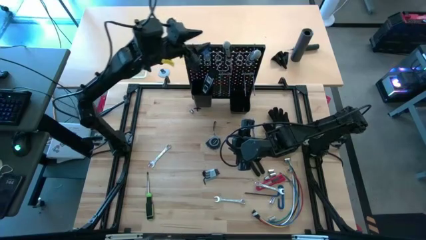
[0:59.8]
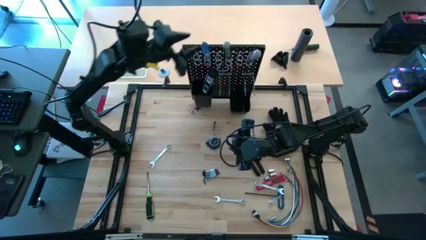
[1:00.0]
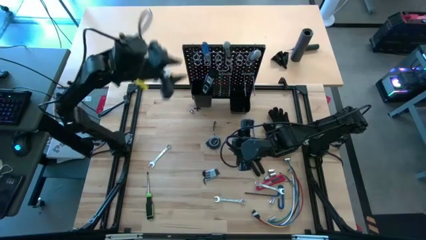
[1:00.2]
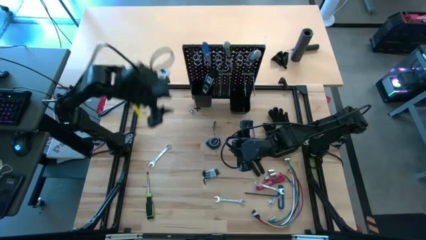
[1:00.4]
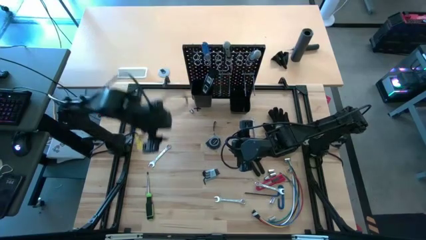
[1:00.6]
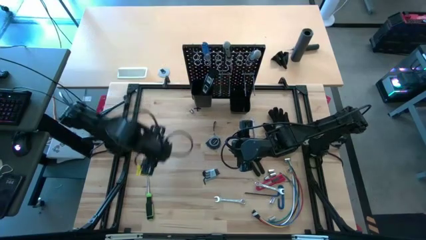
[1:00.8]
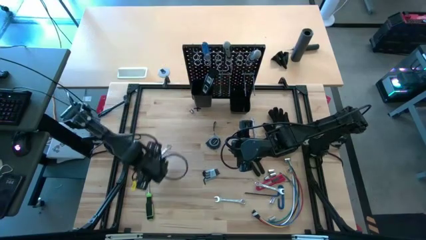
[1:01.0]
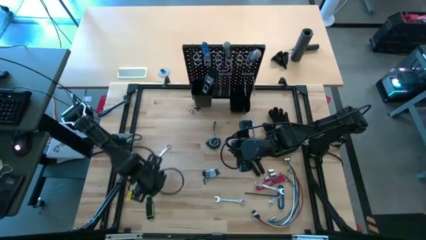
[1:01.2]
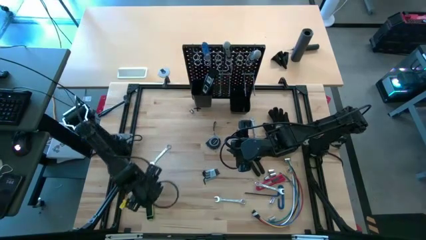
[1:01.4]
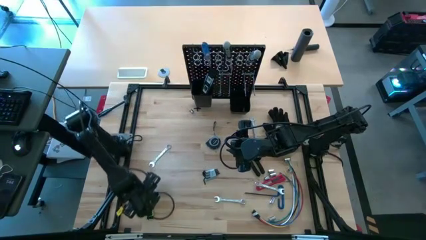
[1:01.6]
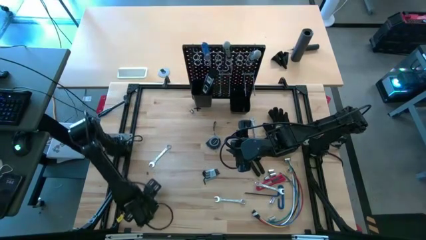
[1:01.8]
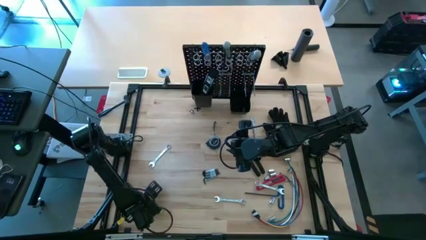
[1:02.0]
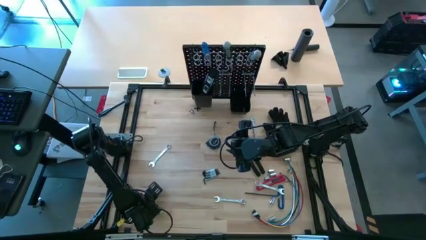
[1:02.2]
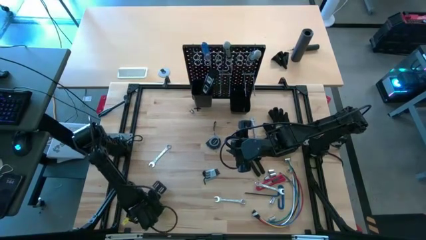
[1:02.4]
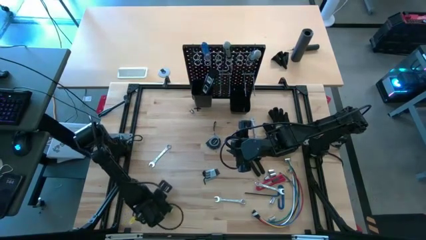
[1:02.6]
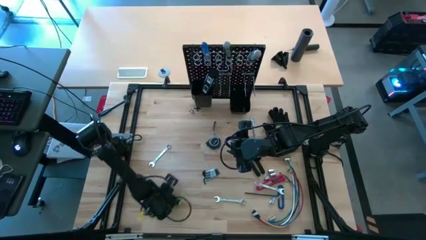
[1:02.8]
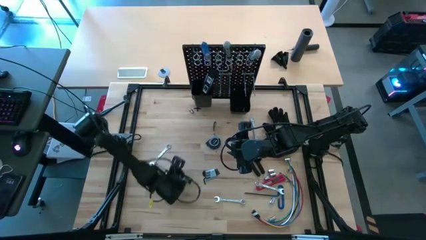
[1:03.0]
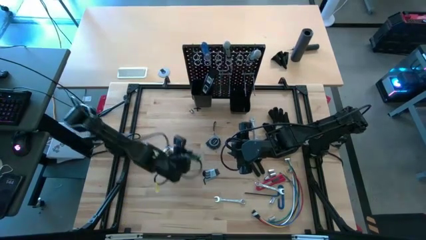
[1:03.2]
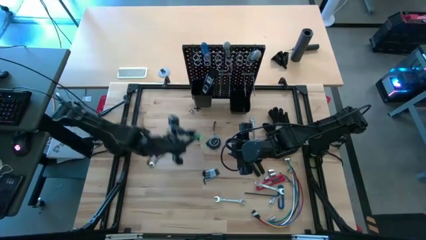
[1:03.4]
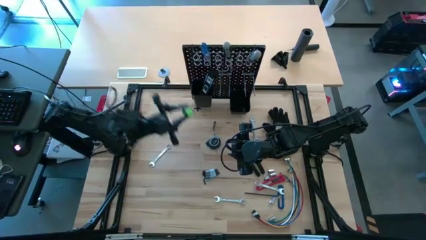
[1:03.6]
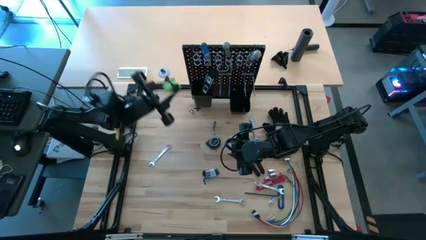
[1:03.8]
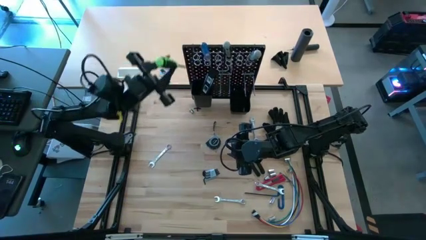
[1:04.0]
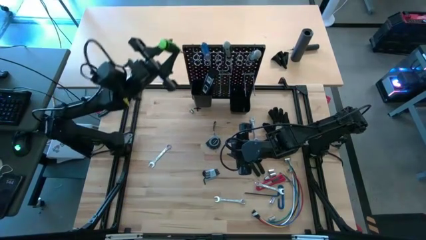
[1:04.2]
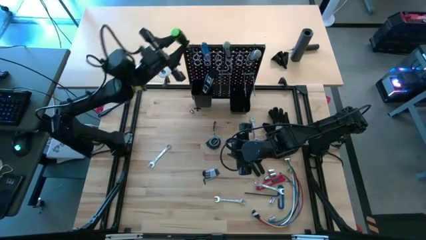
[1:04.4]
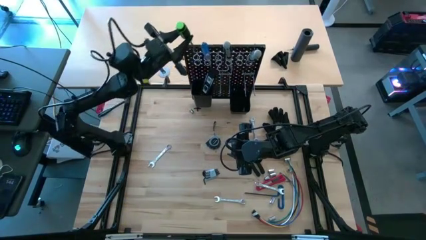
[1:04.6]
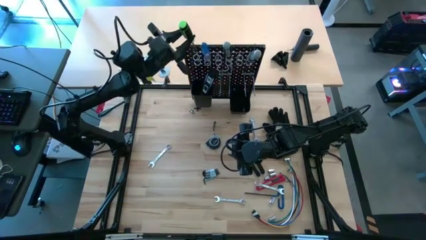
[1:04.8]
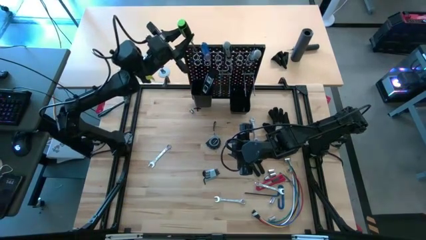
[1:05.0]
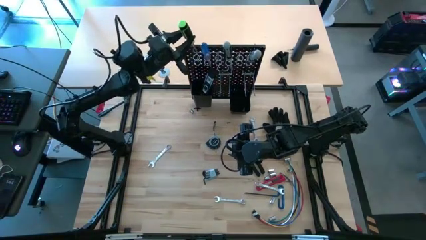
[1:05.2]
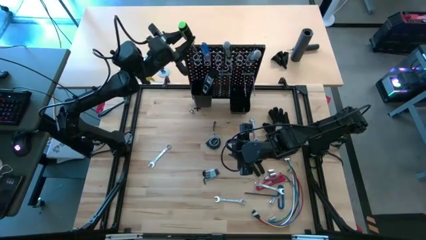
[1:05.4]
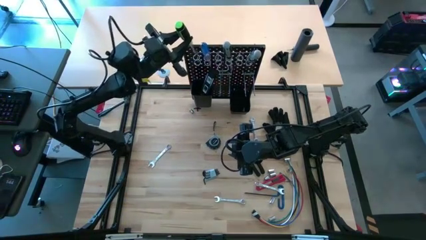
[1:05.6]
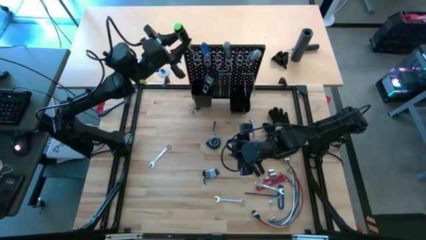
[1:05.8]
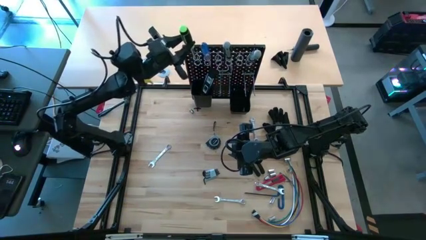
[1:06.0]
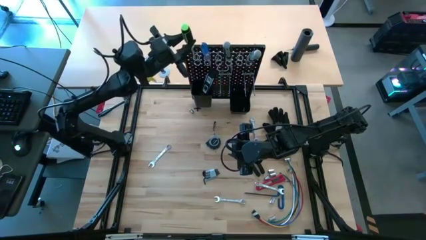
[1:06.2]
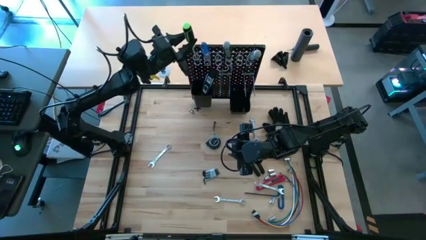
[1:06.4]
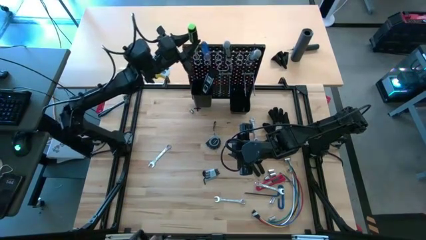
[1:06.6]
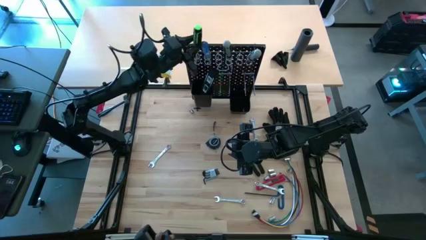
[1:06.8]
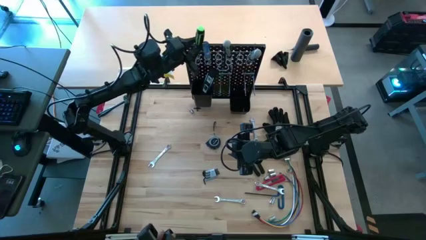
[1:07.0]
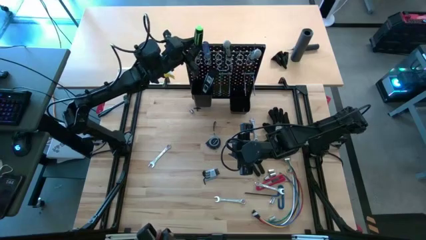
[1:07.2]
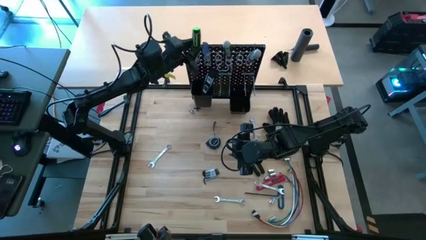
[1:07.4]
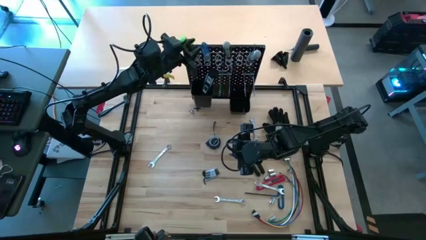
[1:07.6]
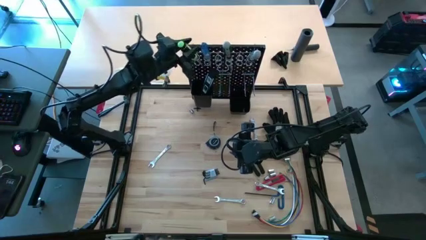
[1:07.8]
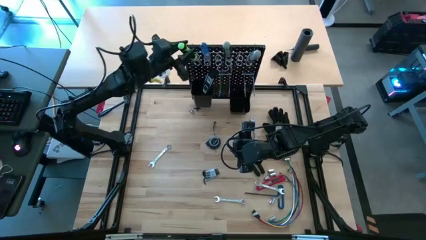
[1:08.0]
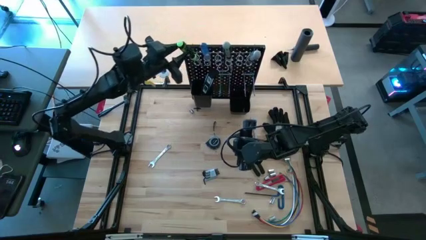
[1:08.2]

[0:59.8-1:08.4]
Task: Hang tools onto peg board
Hang the green screwdriver on the peg board

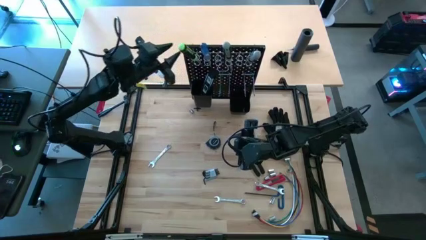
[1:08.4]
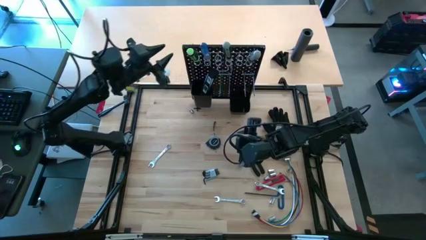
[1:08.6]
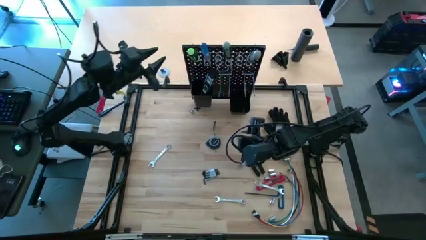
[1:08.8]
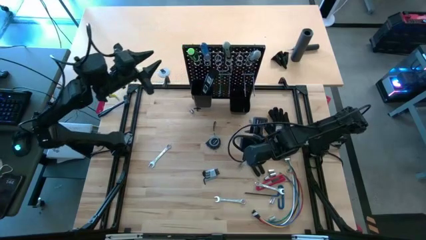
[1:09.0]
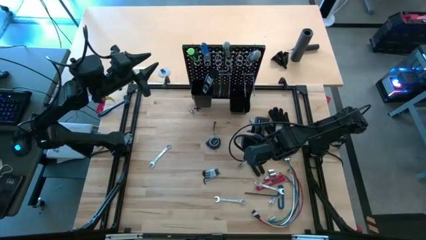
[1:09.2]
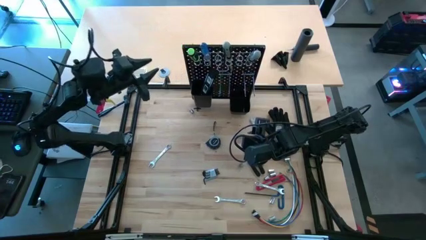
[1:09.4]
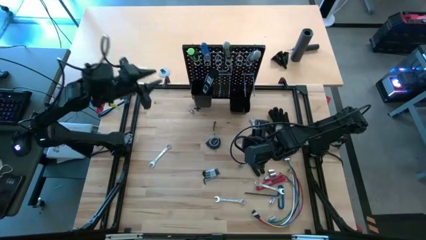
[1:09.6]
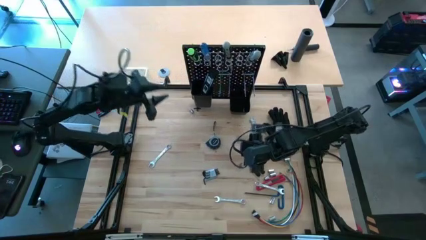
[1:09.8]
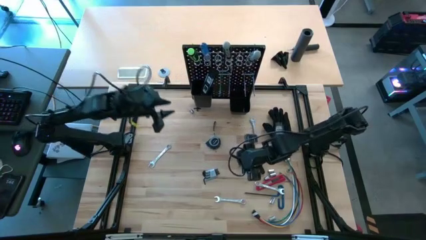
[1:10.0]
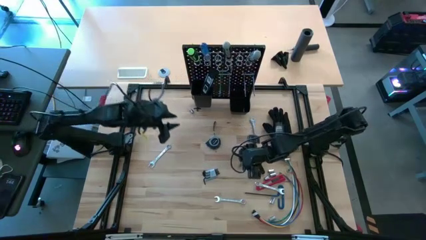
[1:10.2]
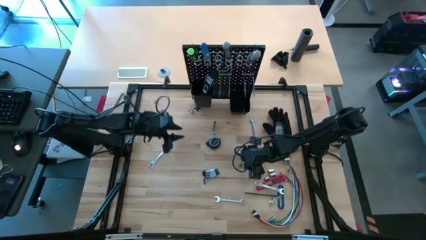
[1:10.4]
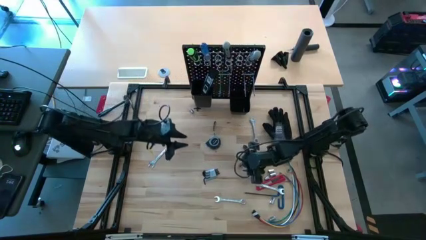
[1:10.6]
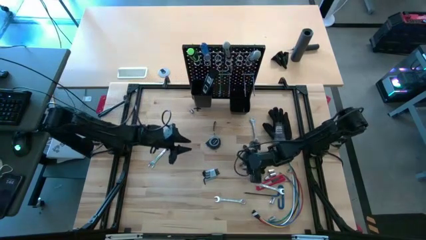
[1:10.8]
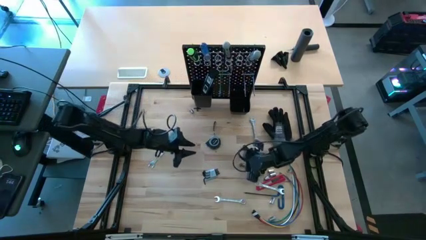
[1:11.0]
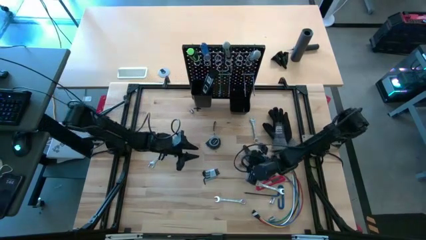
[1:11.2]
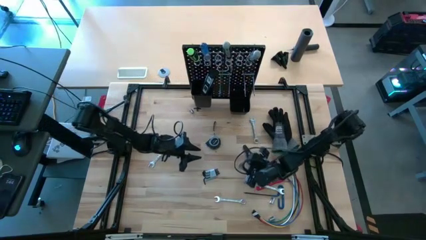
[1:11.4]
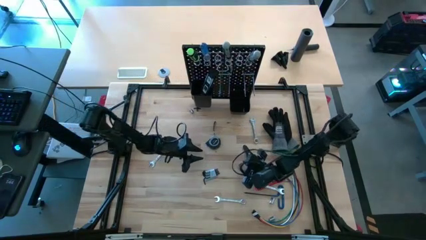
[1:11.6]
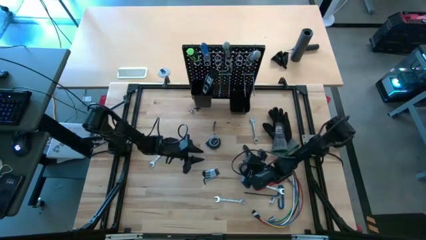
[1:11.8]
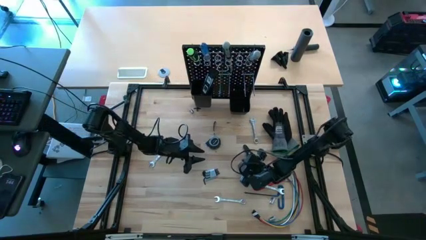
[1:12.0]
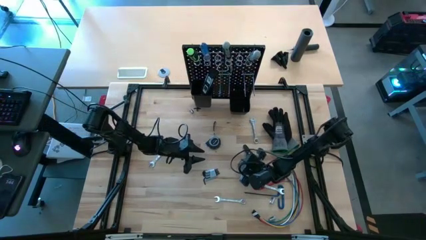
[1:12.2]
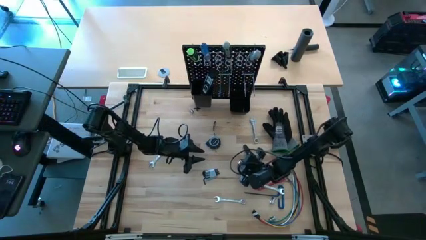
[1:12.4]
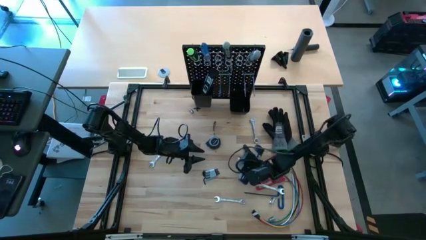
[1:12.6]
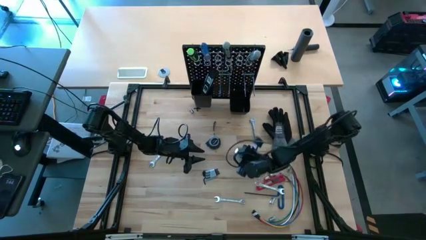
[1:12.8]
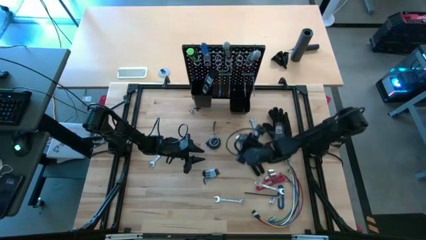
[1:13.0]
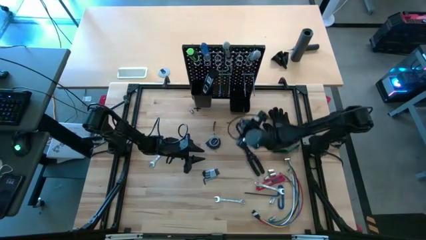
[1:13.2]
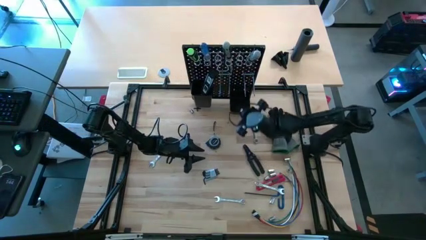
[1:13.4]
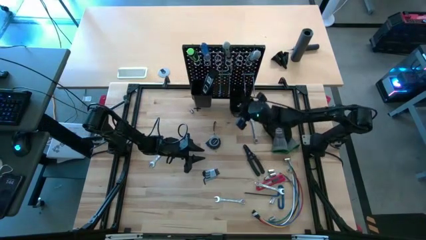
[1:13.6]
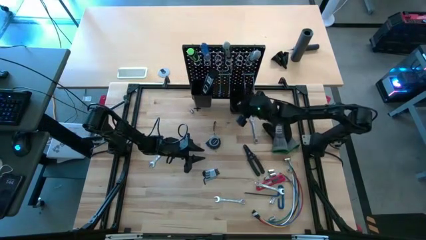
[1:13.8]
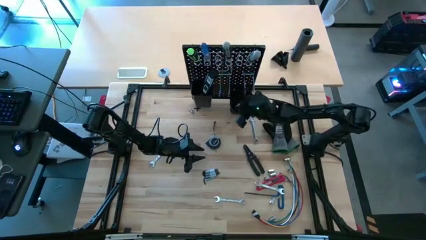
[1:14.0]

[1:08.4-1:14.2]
Put the silver socket driver on the right black bin on the peg board
